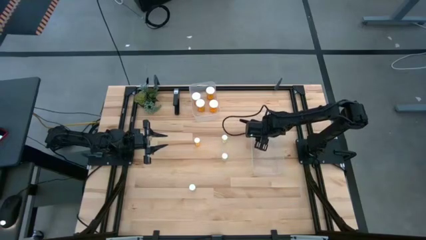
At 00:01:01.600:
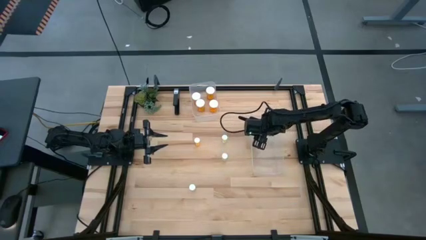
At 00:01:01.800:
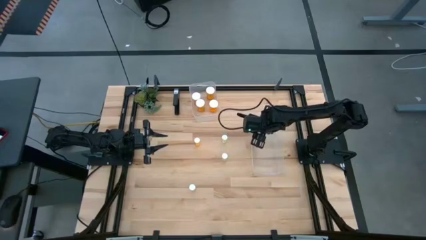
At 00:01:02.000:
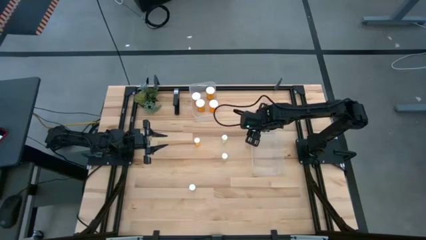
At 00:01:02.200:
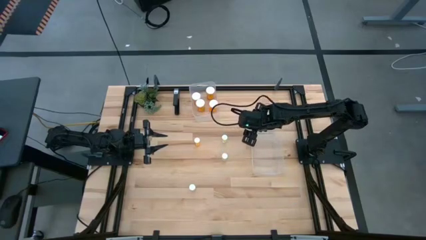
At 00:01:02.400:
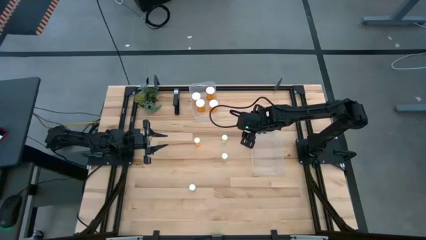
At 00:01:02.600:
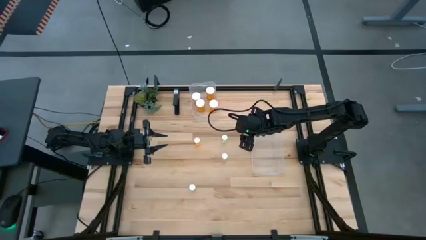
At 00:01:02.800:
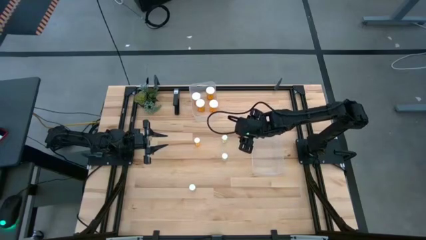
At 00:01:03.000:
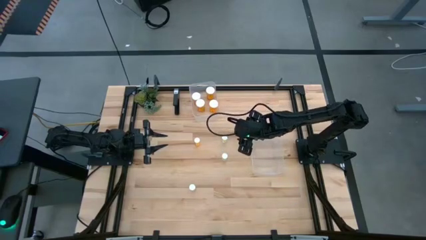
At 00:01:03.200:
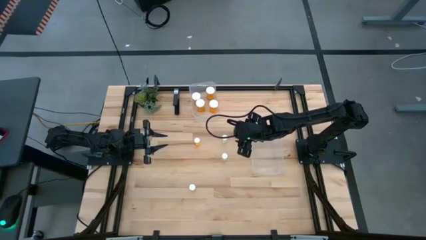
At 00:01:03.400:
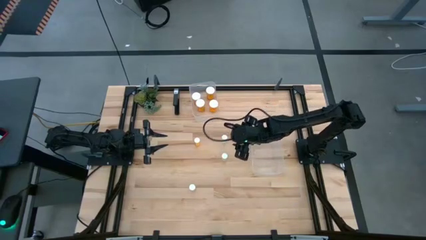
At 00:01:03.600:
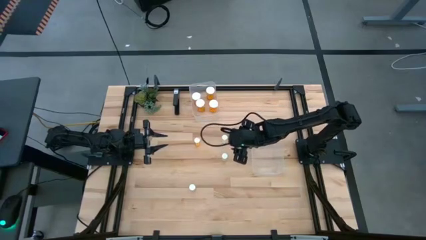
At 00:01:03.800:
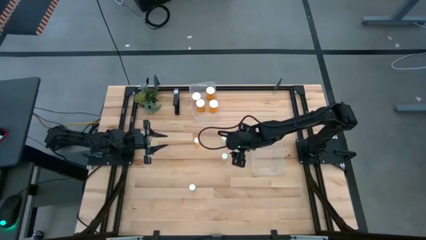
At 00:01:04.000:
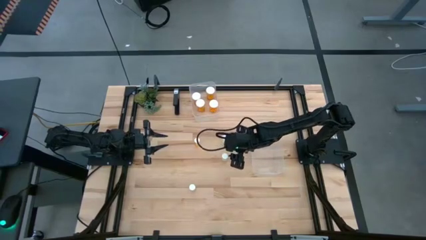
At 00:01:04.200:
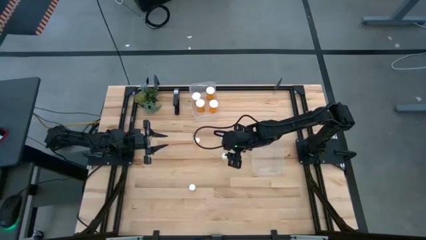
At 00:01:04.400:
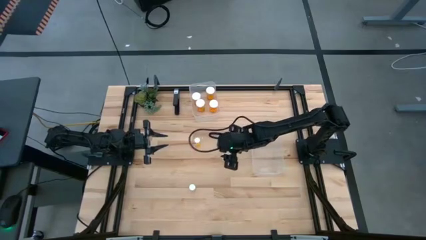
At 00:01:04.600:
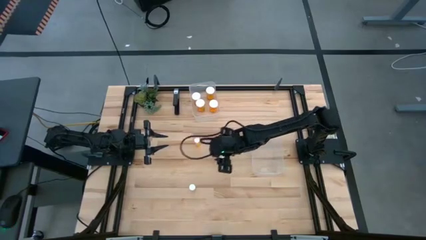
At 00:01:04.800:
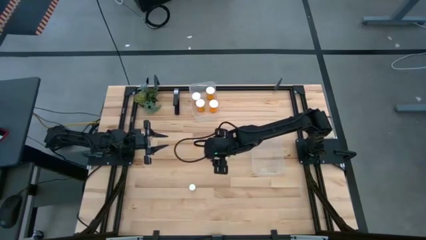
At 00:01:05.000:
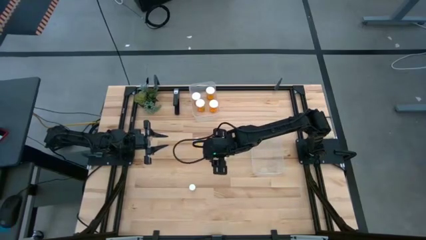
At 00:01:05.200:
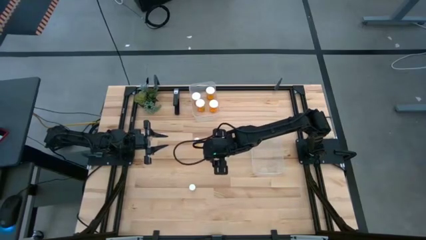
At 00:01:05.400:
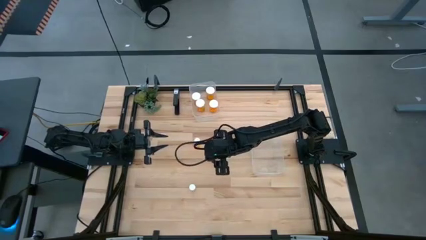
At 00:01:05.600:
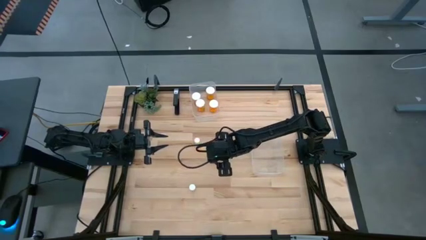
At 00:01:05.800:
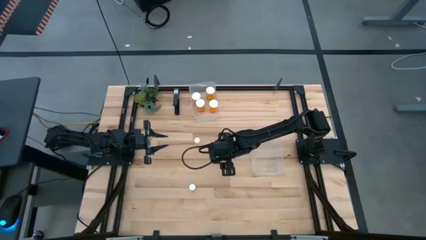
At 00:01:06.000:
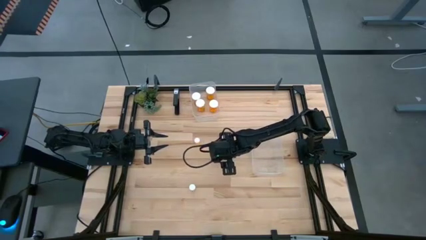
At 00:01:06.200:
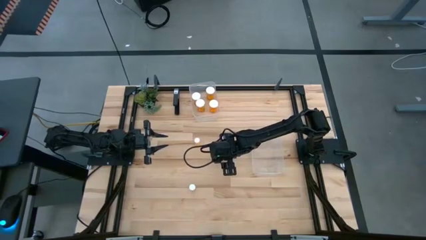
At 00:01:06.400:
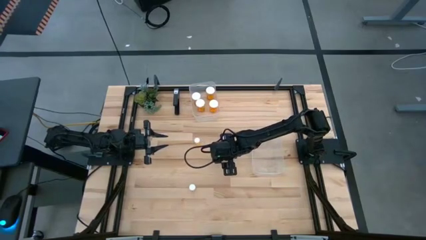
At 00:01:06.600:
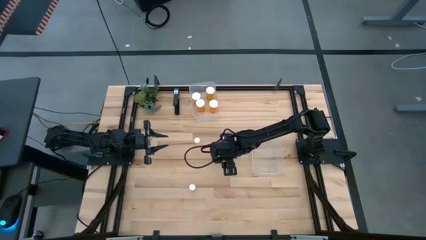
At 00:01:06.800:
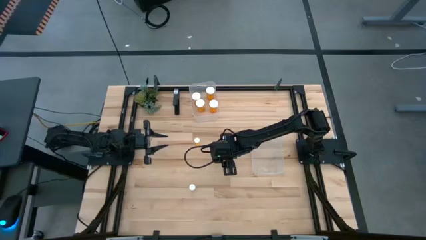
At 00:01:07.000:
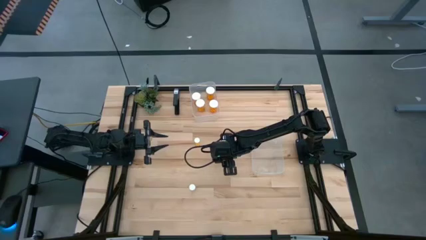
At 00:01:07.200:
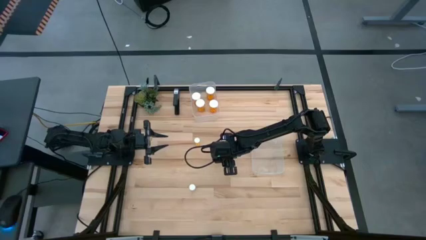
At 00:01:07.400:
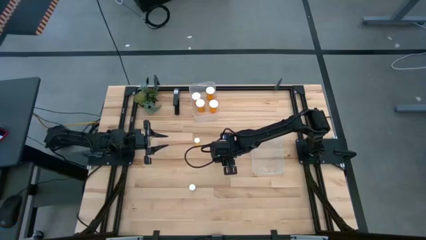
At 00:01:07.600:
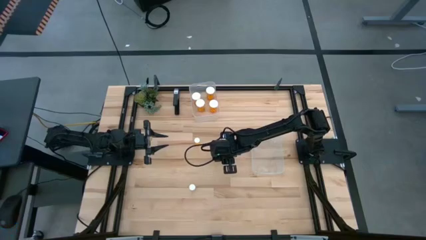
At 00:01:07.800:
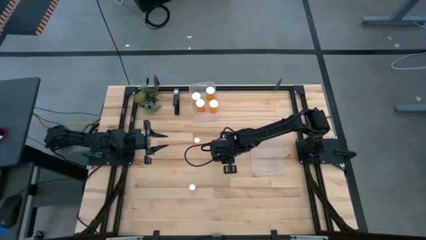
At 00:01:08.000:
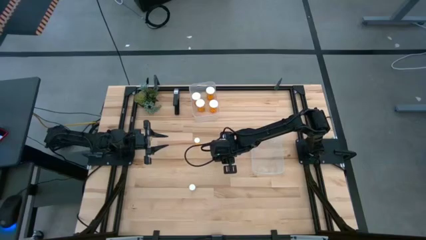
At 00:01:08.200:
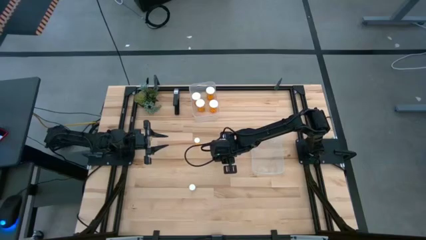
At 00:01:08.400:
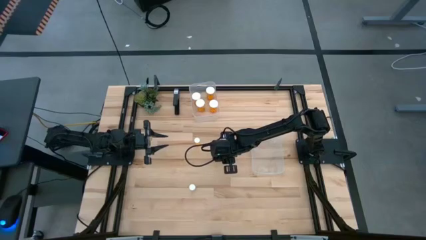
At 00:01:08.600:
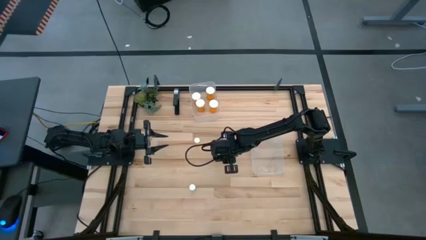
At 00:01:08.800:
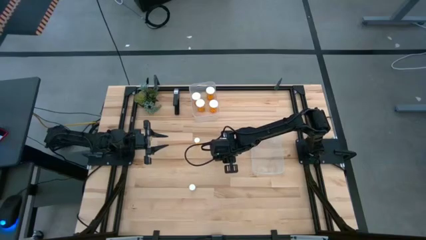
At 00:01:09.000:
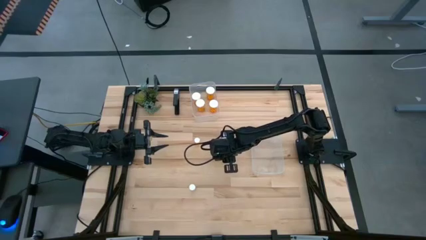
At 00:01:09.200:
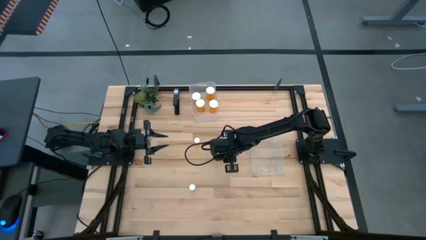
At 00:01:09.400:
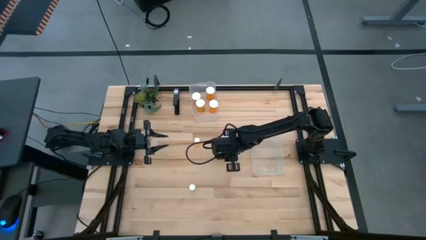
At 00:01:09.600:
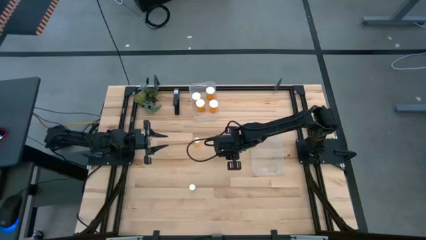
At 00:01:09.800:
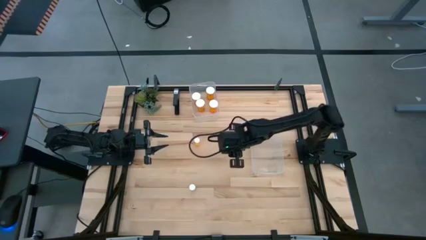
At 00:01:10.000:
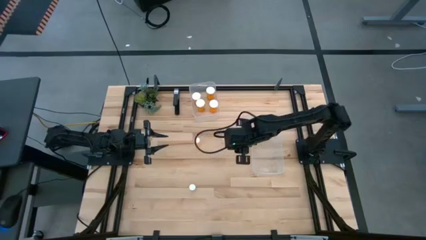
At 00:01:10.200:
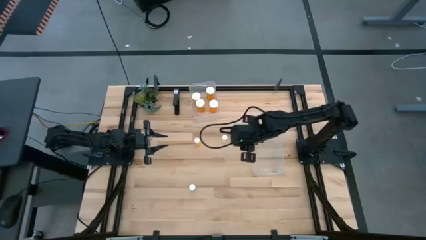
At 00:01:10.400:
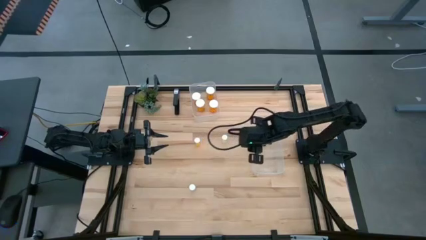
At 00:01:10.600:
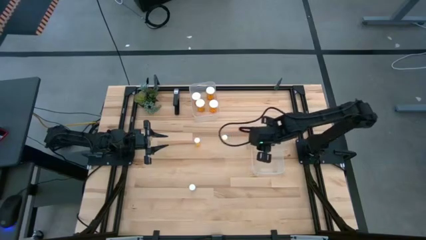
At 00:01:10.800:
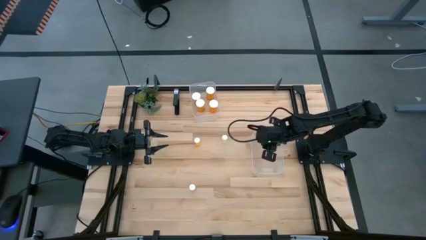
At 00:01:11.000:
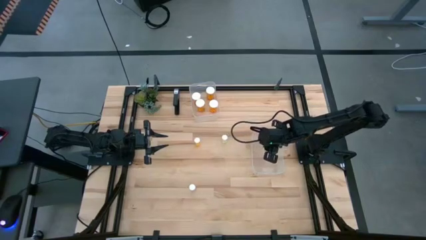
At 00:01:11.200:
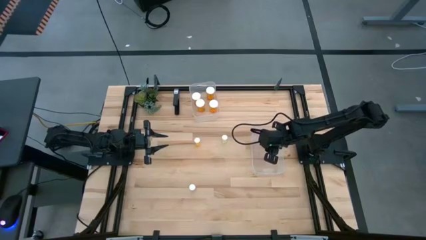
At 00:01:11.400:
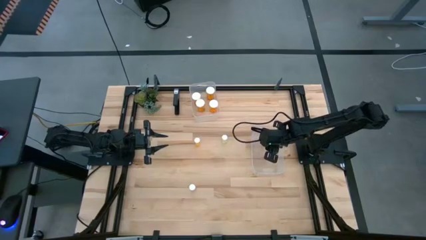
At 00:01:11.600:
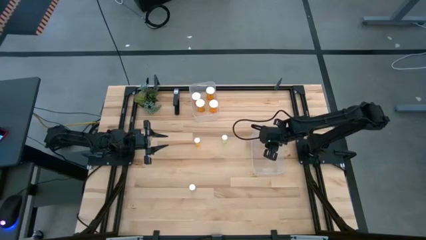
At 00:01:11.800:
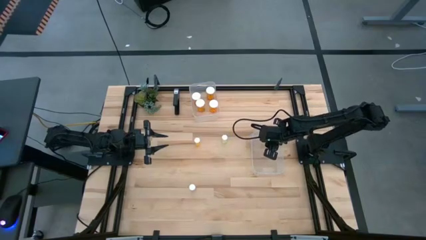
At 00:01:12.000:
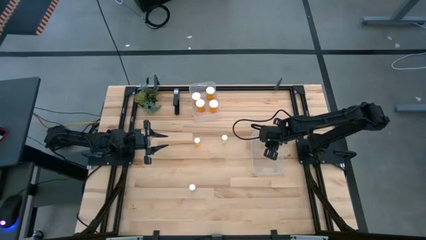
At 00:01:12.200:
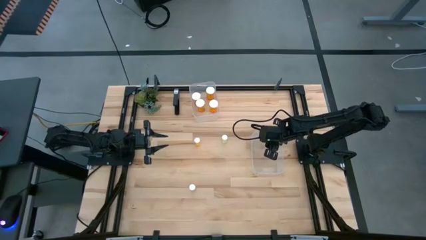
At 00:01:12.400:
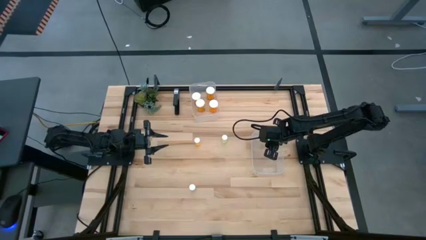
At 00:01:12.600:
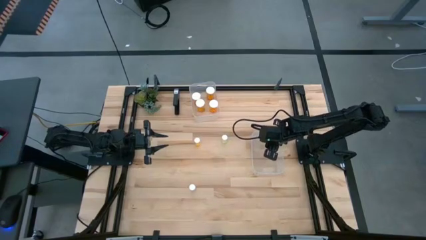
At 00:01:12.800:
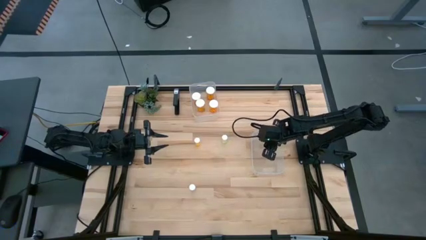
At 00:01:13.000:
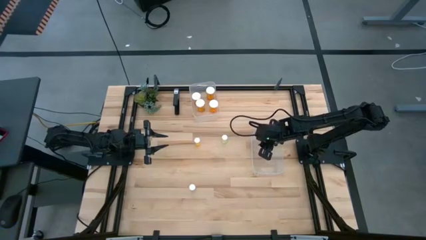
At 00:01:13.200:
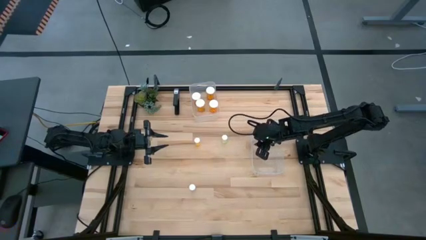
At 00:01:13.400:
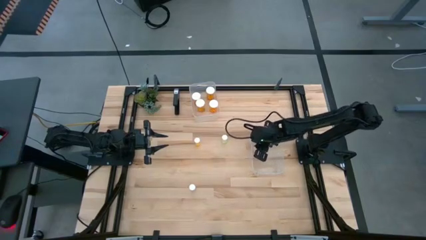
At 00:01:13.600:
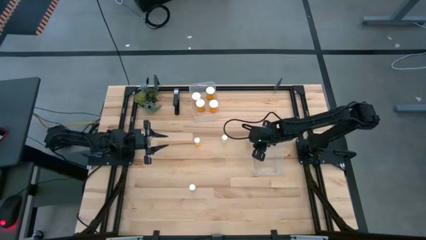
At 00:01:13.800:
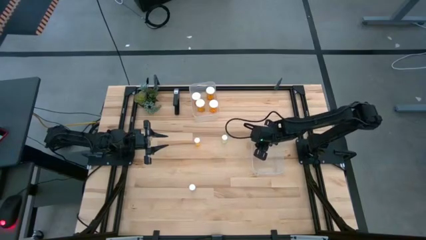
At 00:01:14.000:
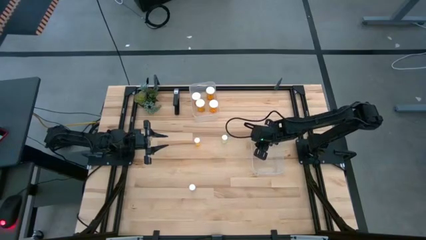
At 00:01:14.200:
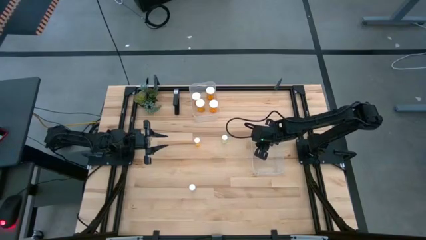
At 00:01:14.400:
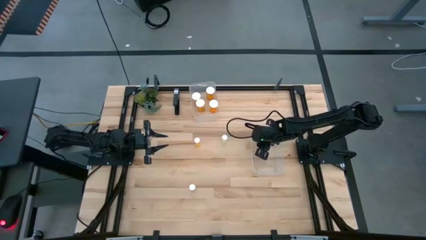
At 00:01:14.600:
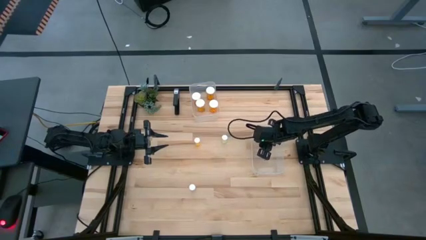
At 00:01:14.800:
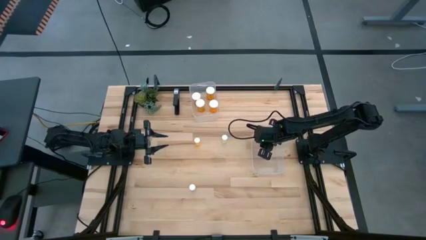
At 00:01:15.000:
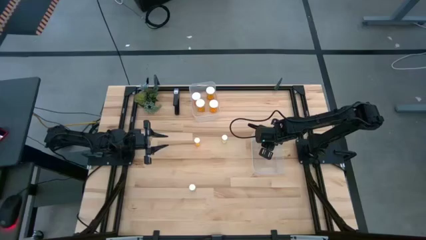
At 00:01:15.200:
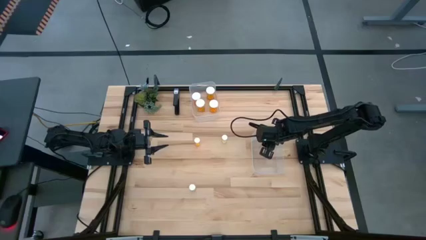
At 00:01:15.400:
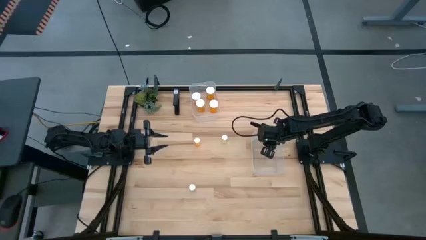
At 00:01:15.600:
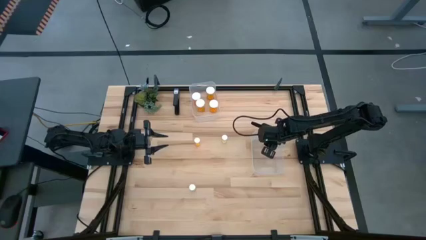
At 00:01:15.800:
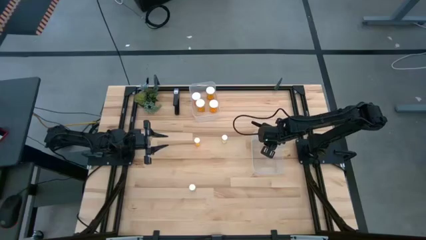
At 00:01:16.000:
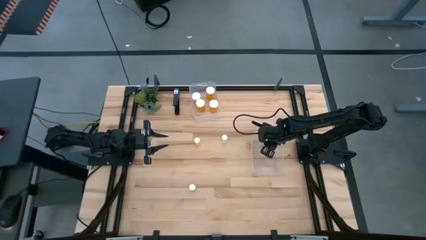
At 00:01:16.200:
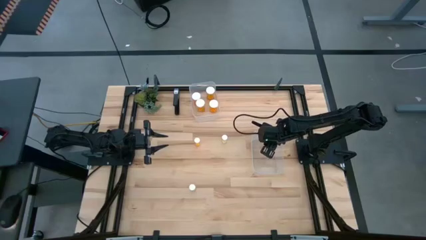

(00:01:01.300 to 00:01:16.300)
Task: Pick and place medicine bottles into bin by pill shape (circle, oval)
Put the yellow tablet bottle into the bottom transparent bin
